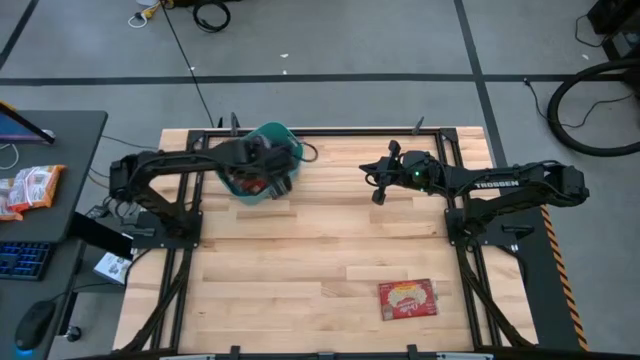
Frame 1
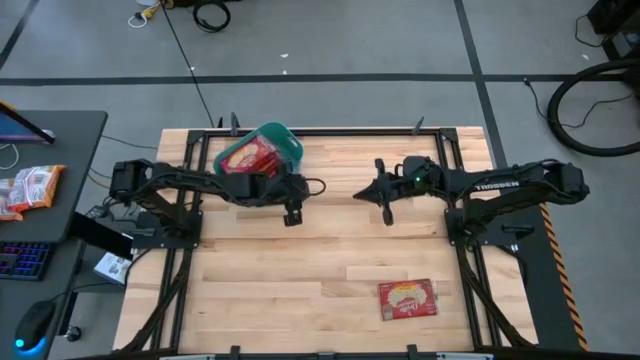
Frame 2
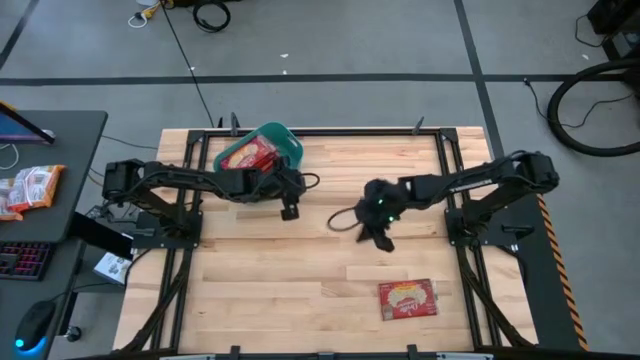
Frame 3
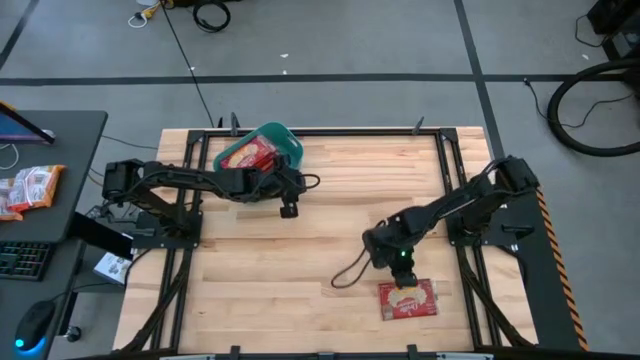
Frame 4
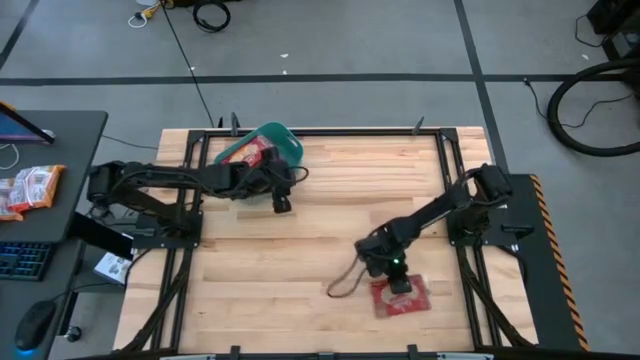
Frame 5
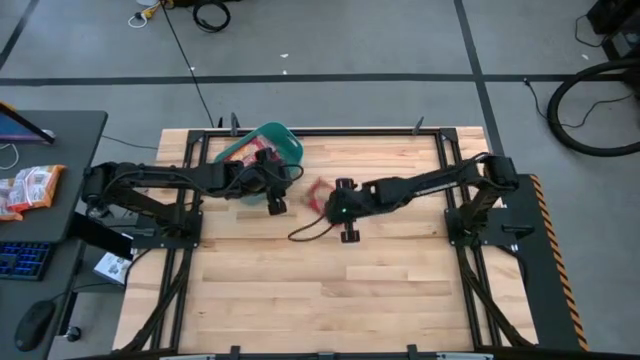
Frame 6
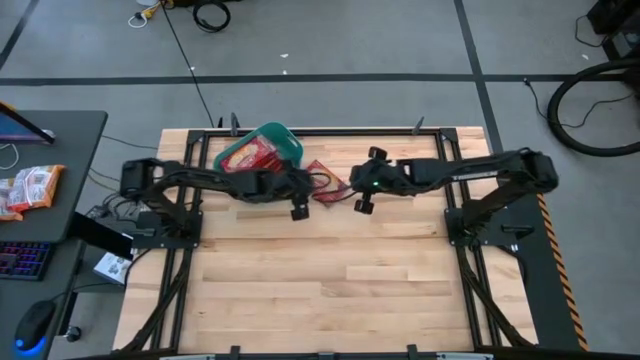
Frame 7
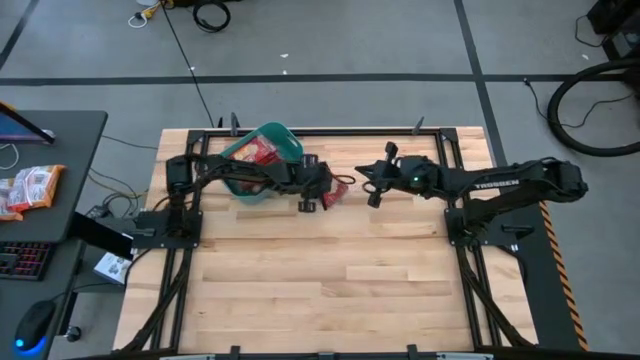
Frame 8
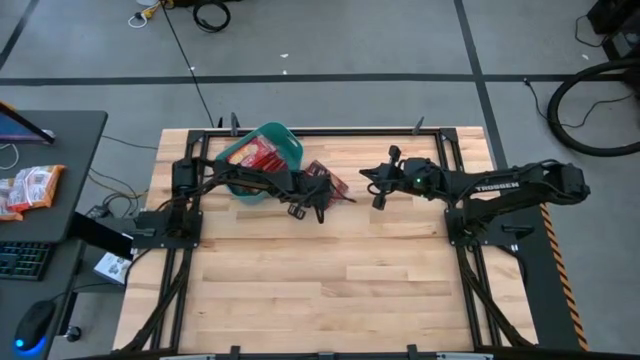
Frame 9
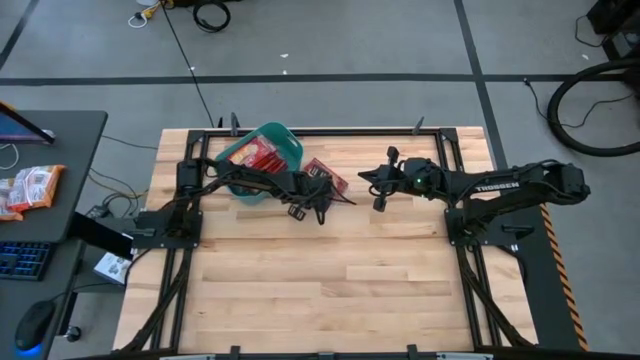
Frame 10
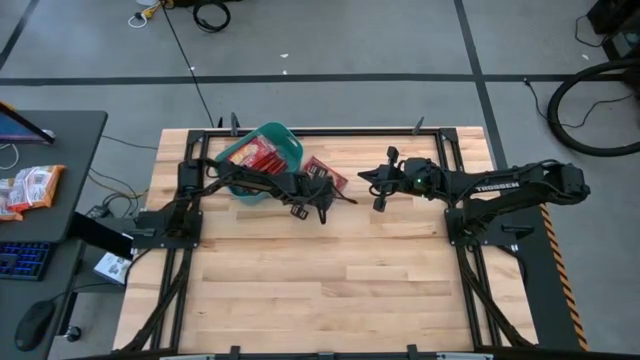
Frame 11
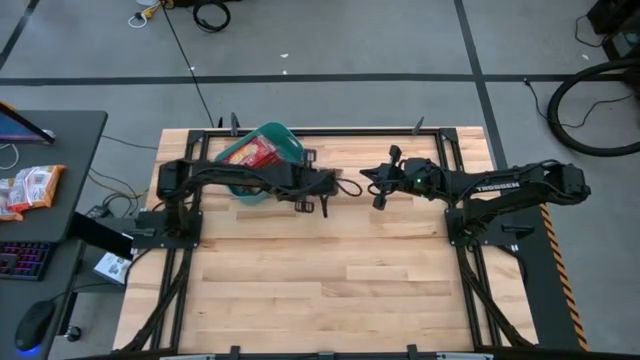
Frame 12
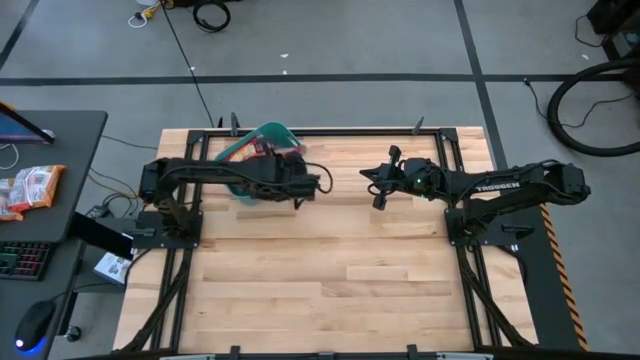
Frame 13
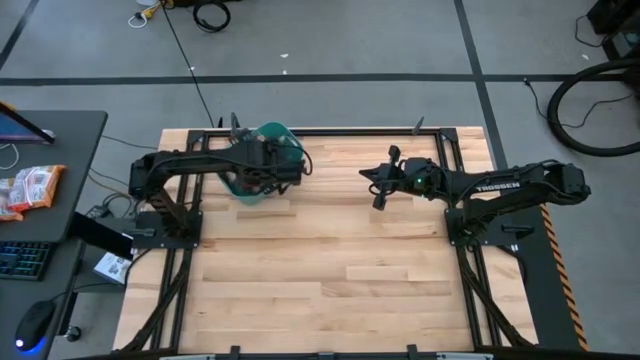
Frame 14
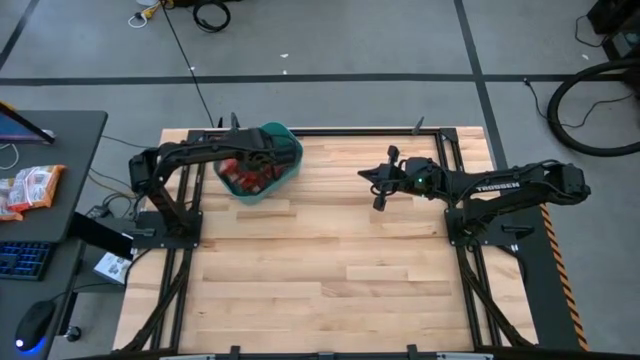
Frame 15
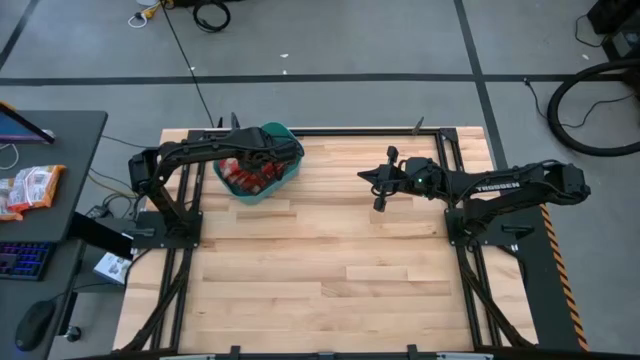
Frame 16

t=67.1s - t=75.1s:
Task: Sort popcorn bags into baskets
Put the popcorn bag into the bin

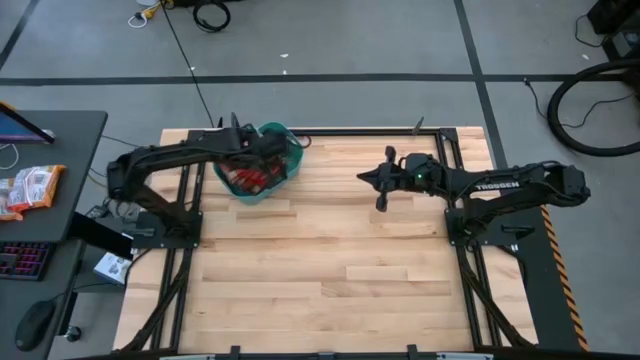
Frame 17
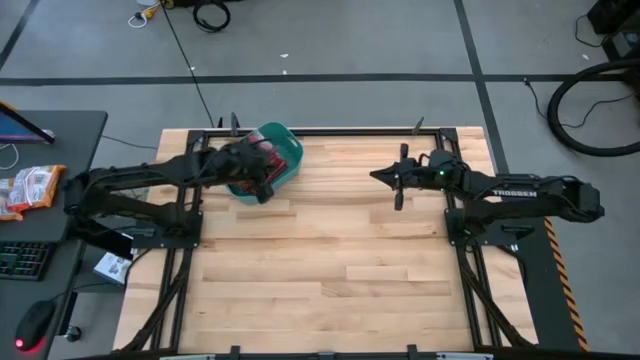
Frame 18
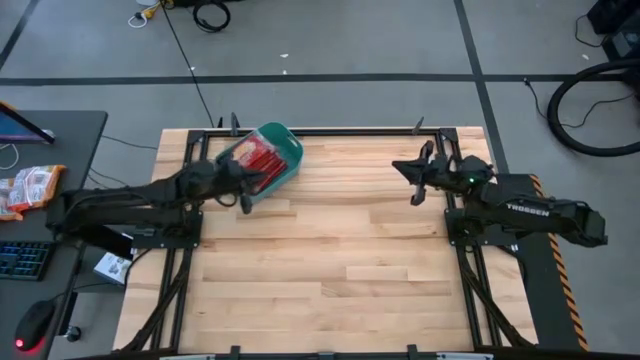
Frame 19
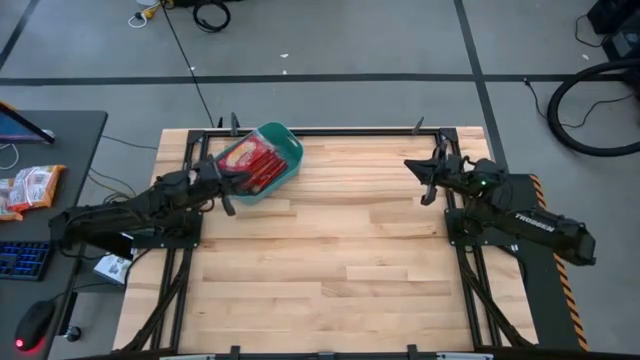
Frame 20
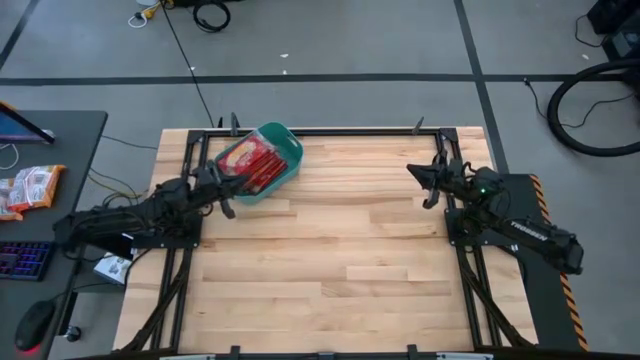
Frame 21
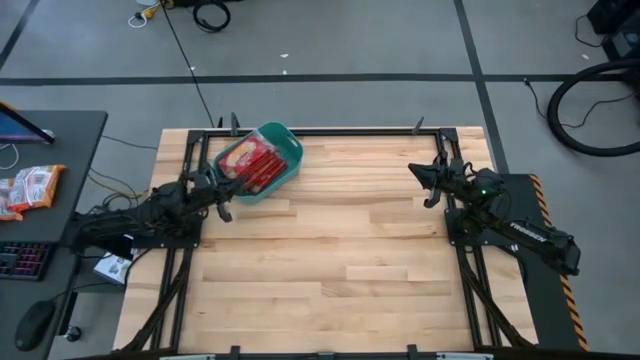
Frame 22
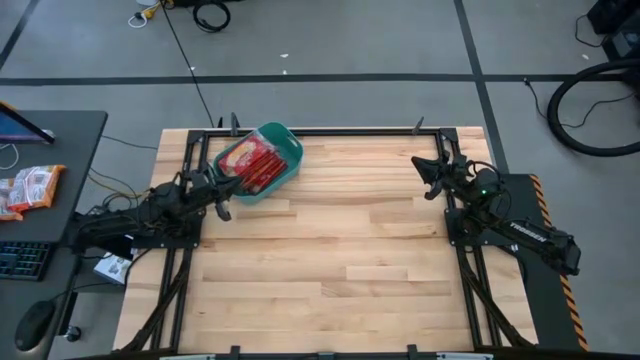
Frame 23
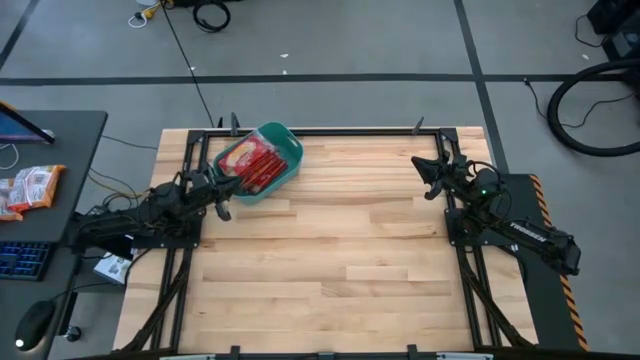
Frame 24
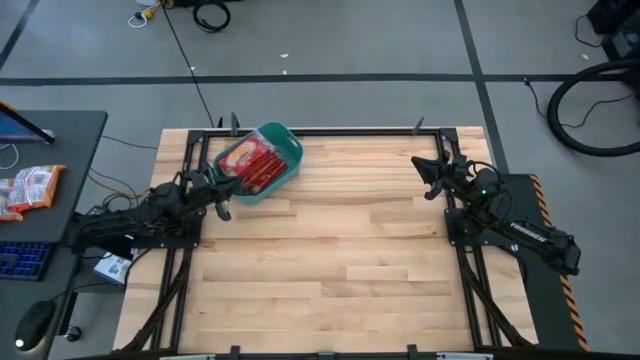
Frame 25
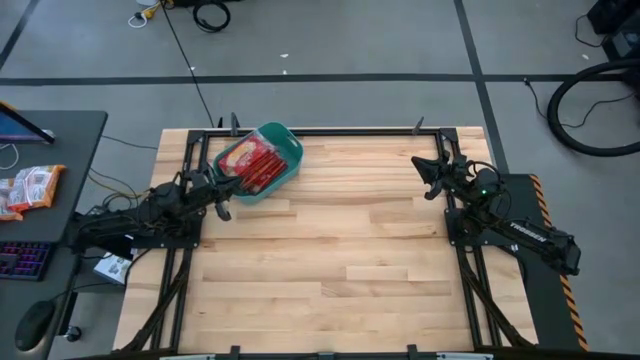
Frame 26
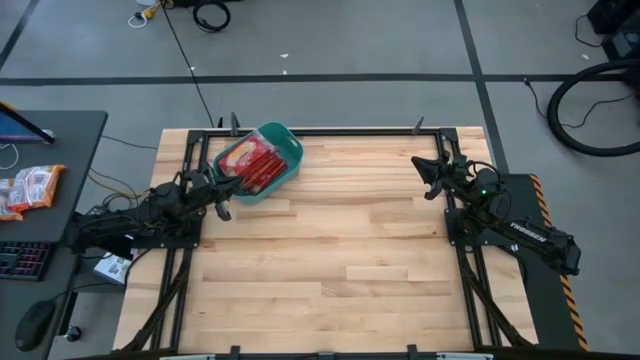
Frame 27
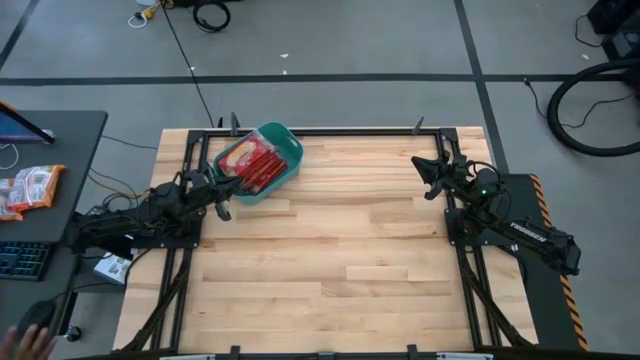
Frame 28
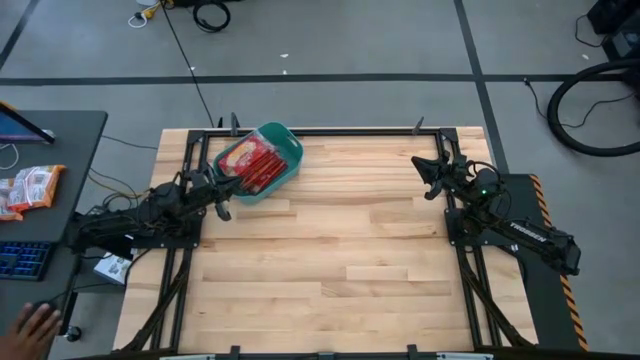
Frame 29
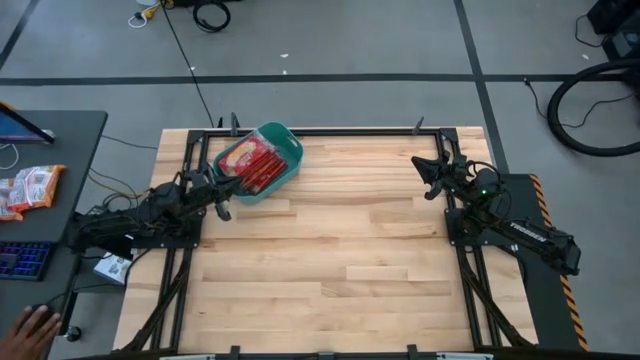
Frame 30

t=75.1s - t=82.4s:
Return to Home Position

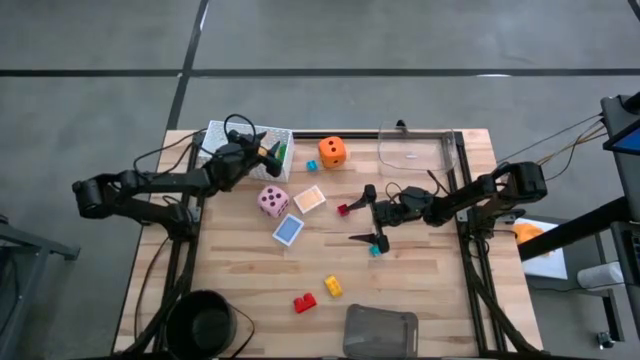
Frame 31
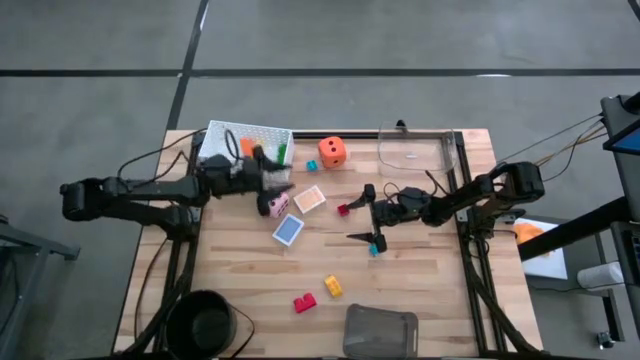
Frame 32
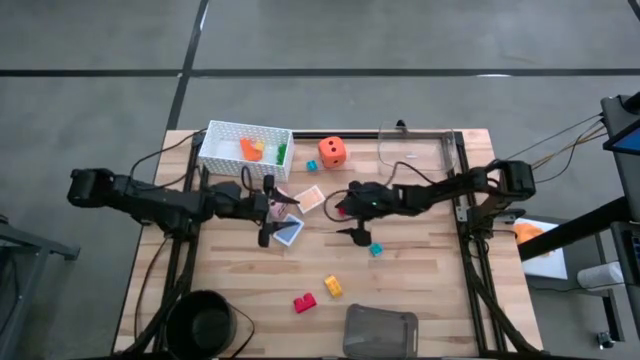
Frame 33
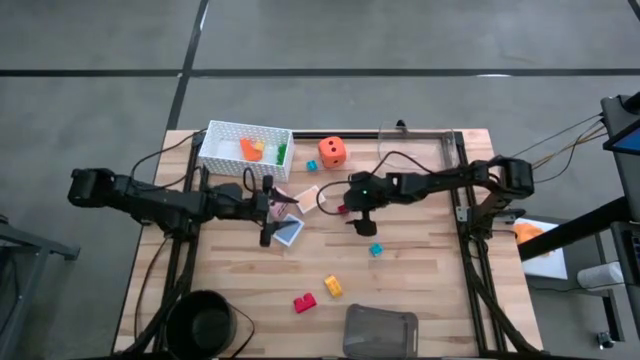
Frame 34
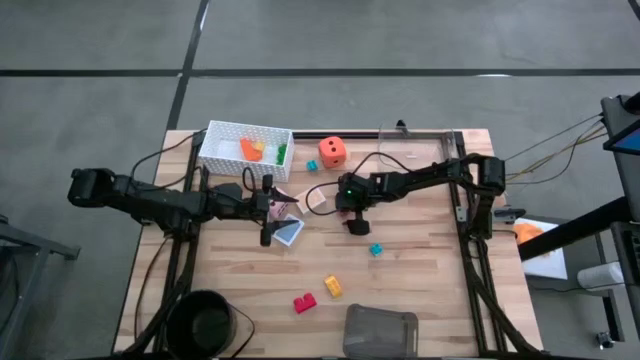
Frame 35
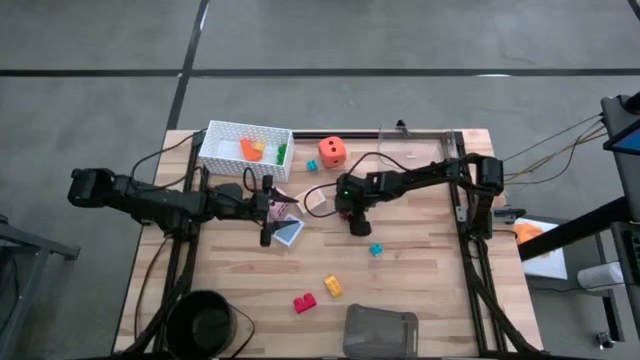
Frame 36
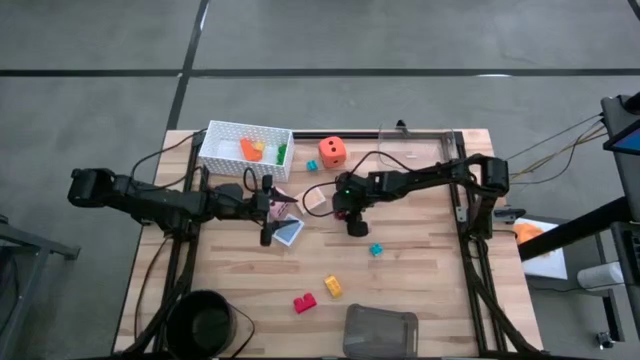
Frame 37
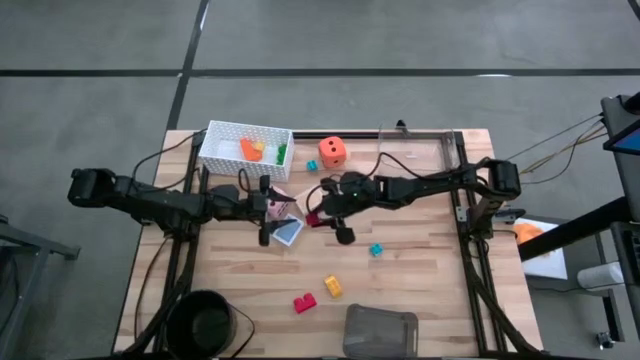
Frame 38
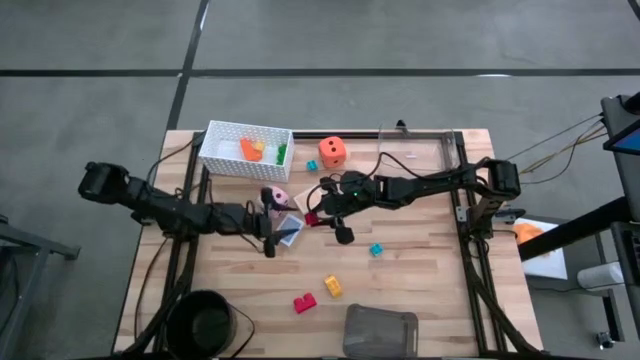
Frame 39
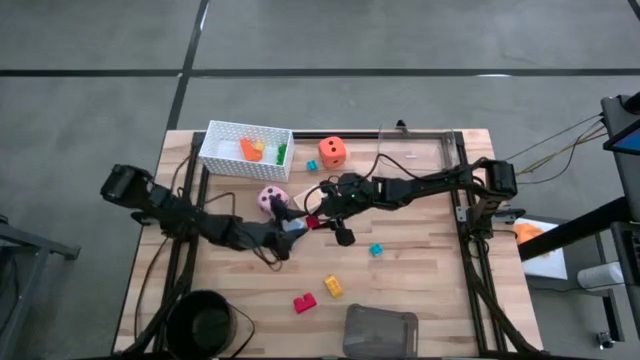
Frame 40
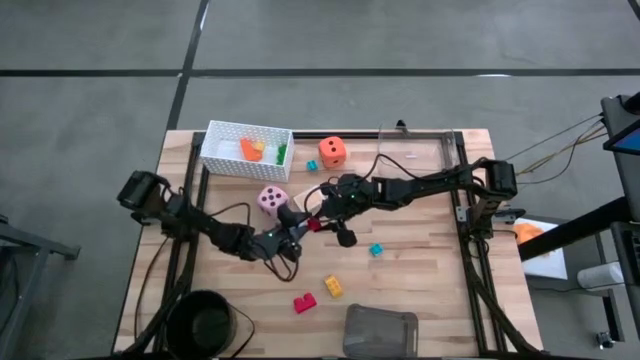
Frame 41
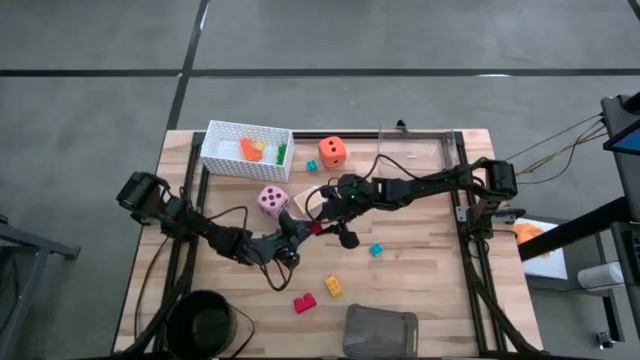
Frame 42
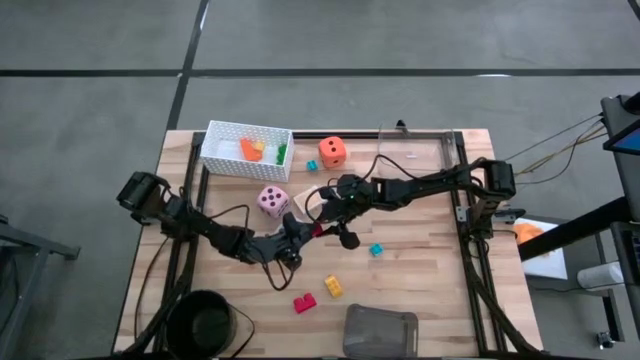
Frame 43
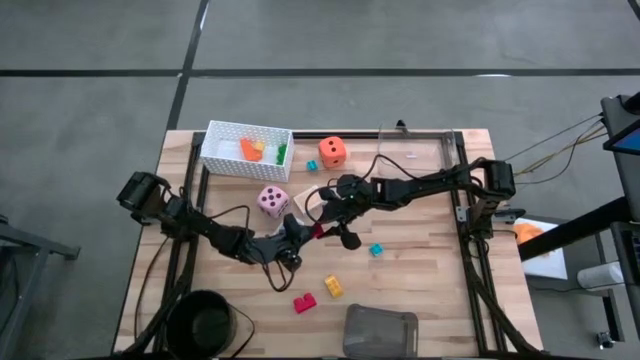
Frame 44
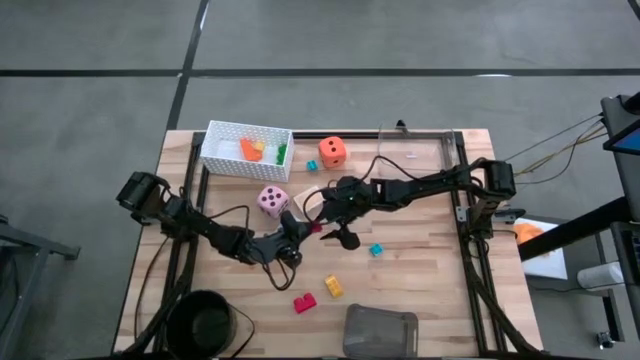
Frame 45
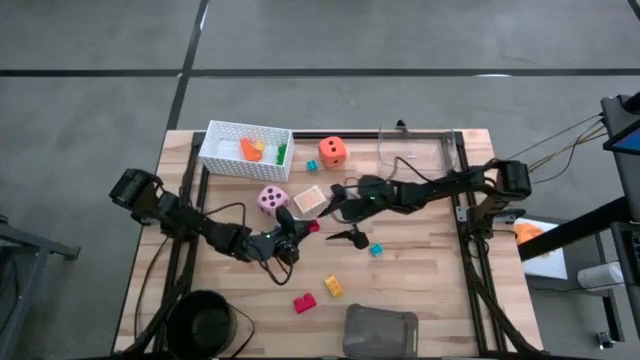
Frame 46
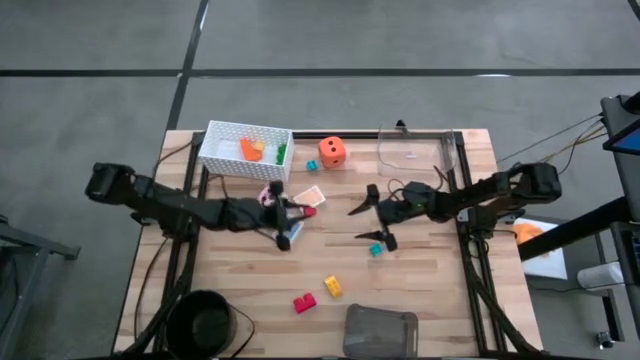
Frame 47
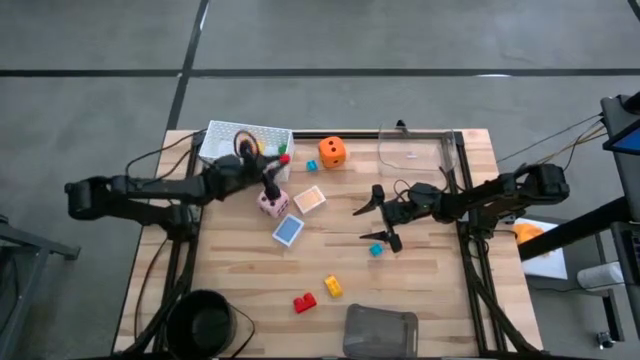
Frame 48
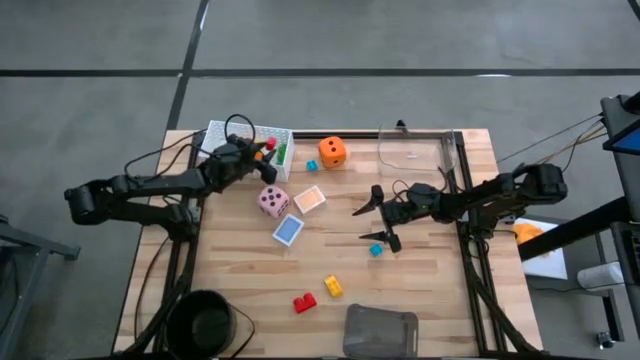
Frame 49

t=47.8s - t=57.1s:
Task: Pick & Place Toys
Put the small red game piece into the white bin
